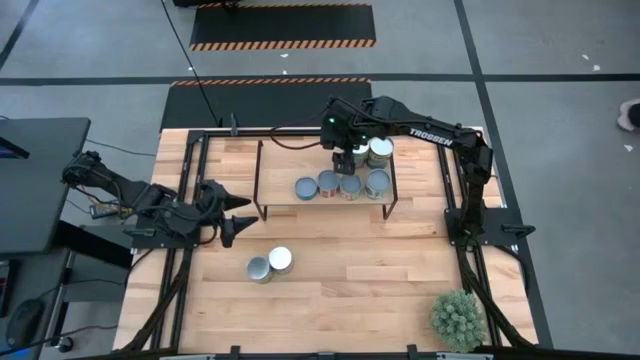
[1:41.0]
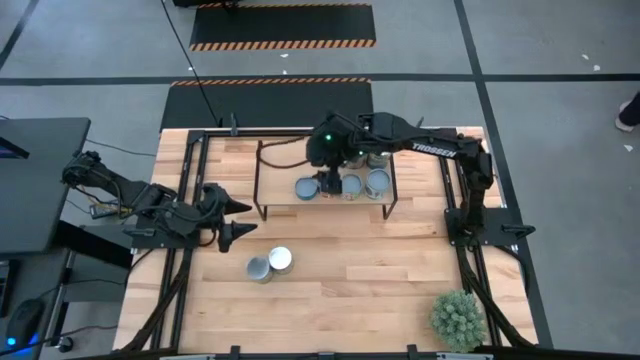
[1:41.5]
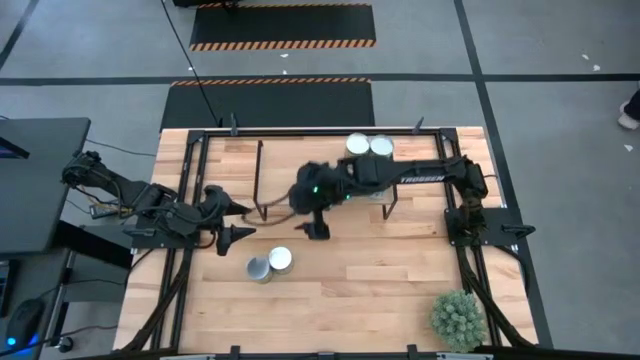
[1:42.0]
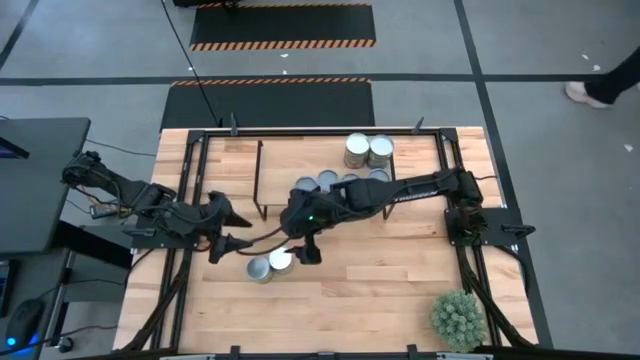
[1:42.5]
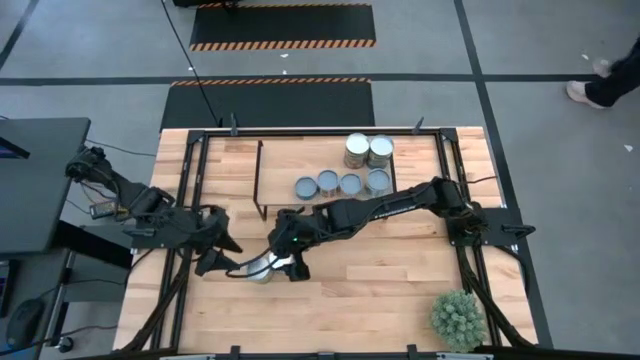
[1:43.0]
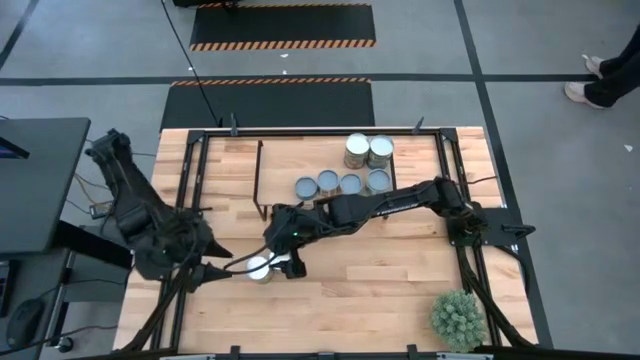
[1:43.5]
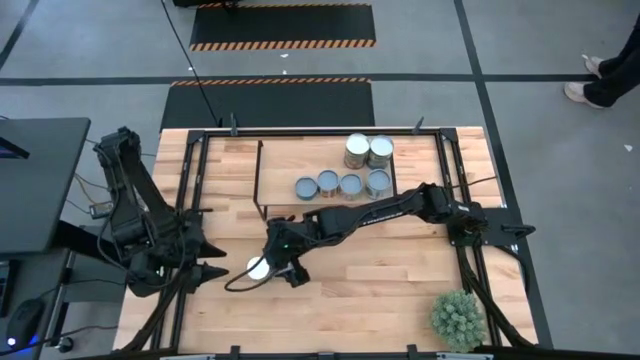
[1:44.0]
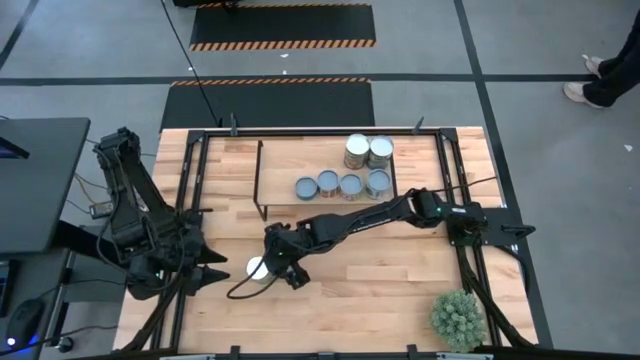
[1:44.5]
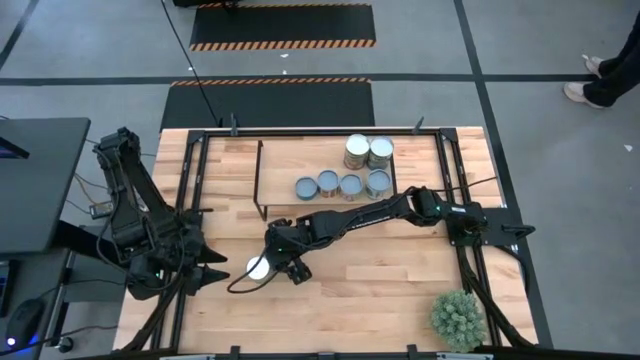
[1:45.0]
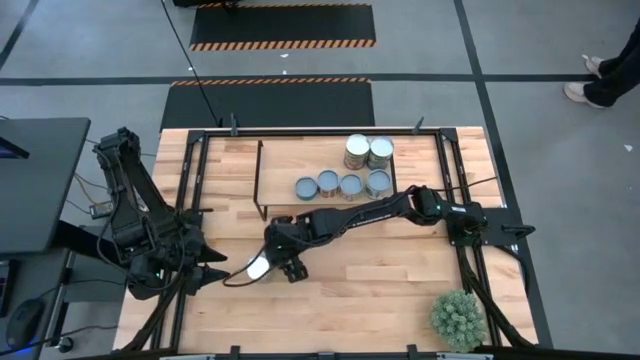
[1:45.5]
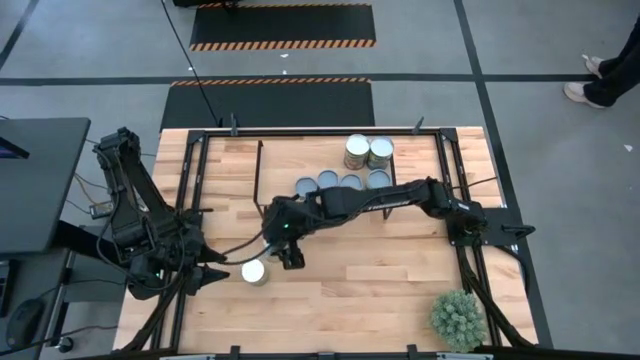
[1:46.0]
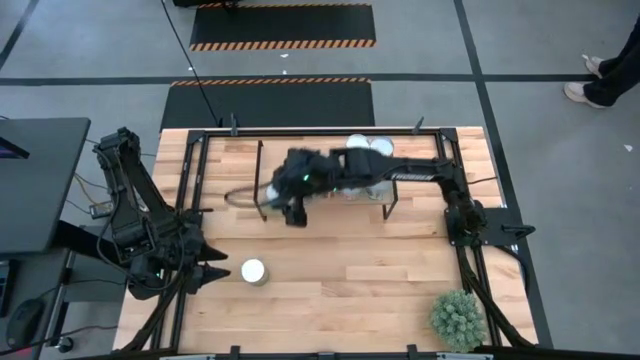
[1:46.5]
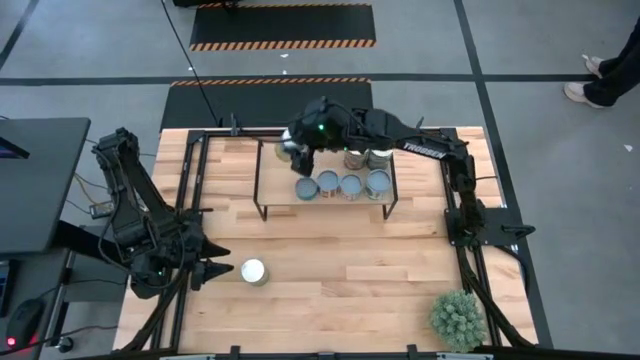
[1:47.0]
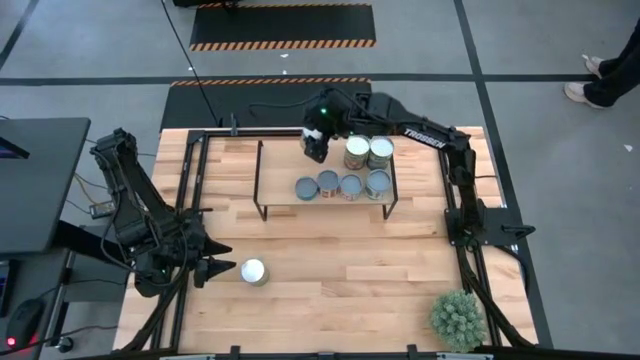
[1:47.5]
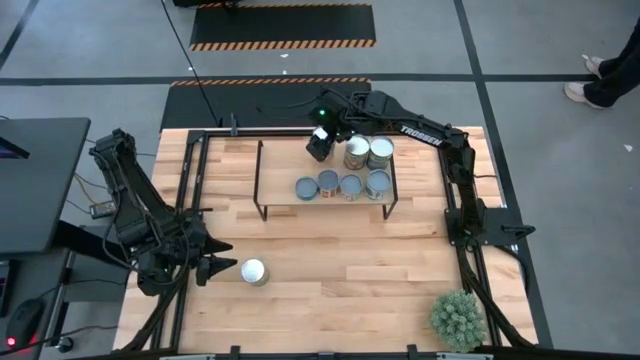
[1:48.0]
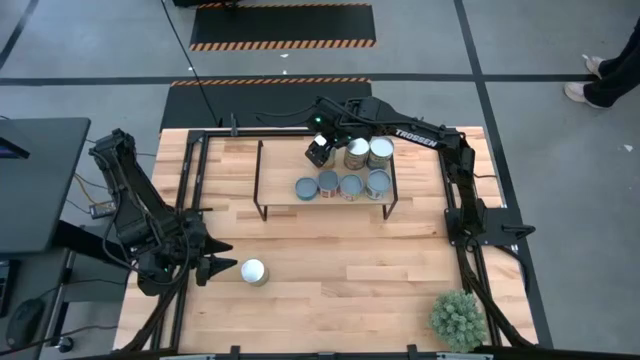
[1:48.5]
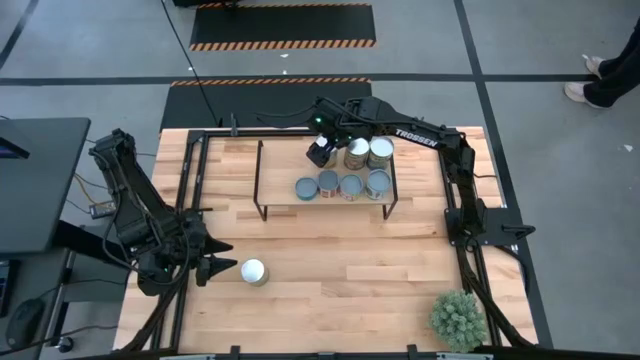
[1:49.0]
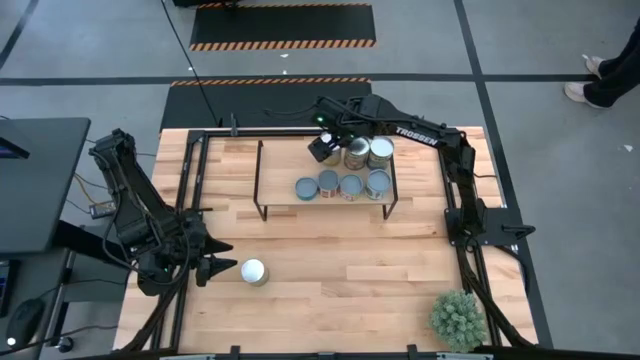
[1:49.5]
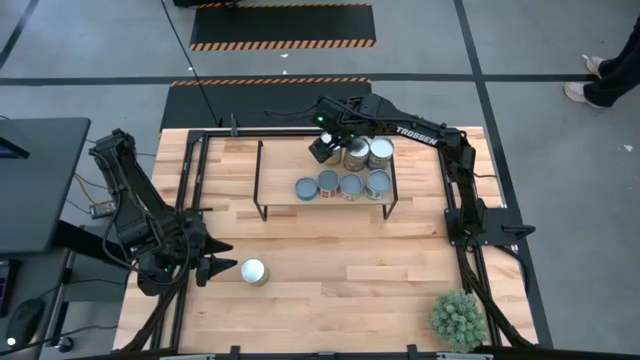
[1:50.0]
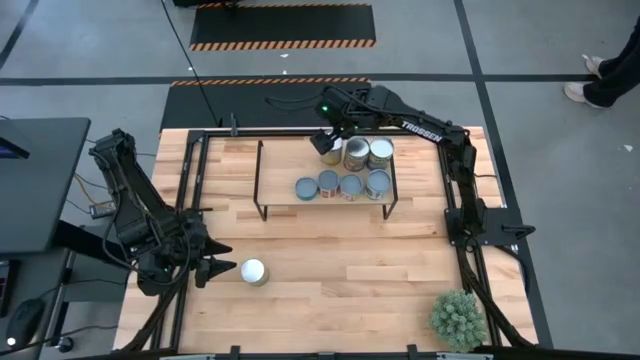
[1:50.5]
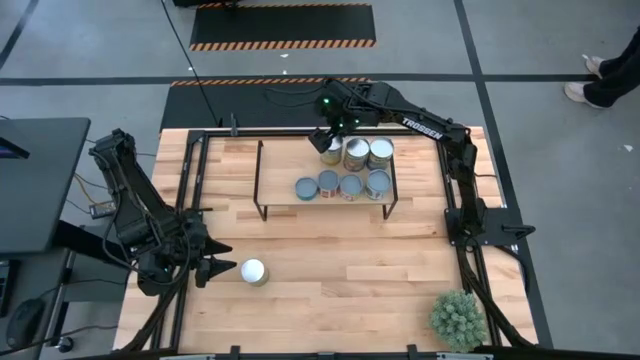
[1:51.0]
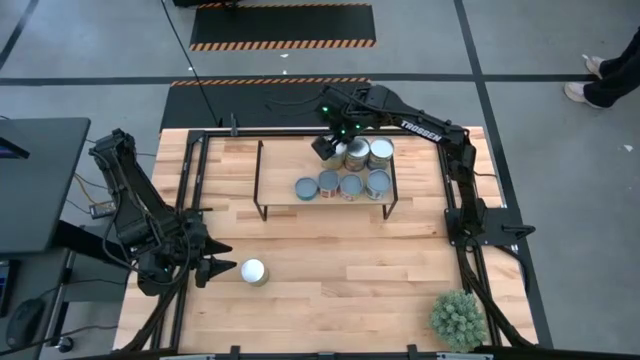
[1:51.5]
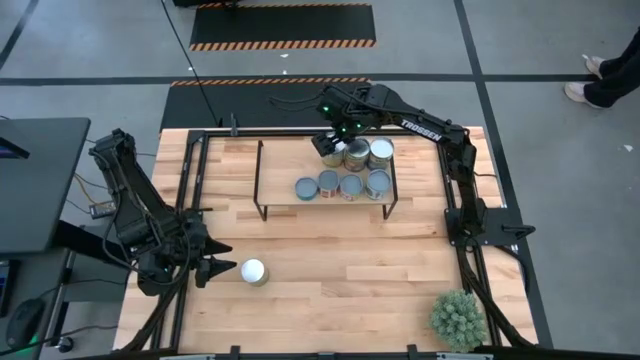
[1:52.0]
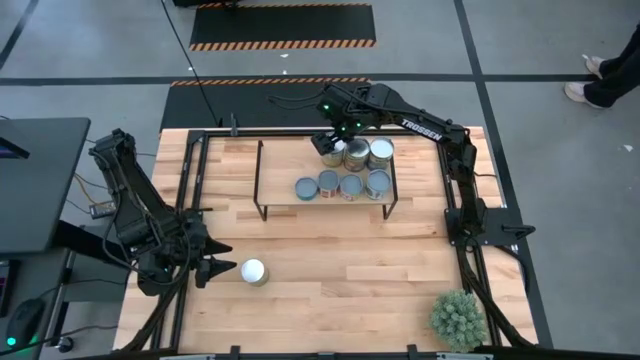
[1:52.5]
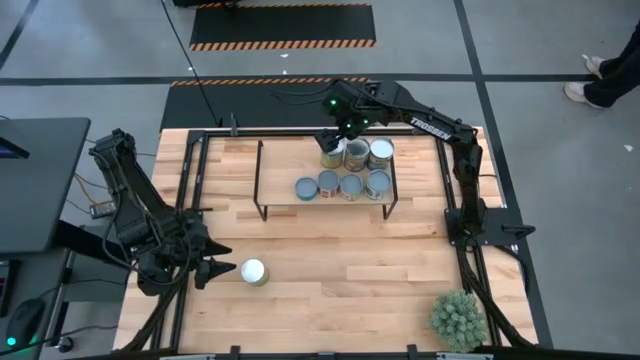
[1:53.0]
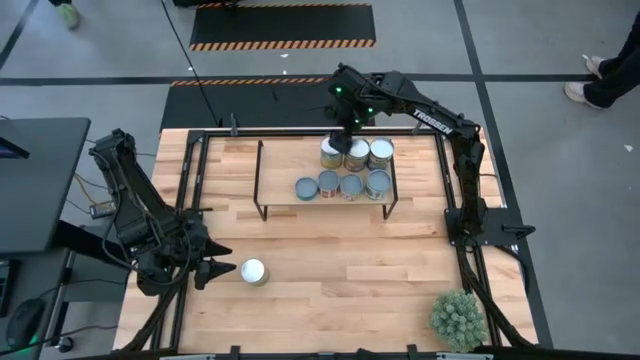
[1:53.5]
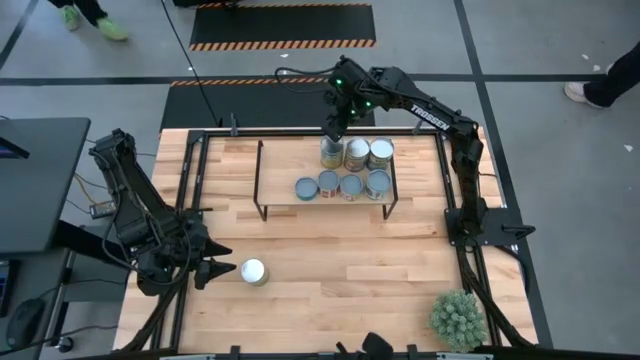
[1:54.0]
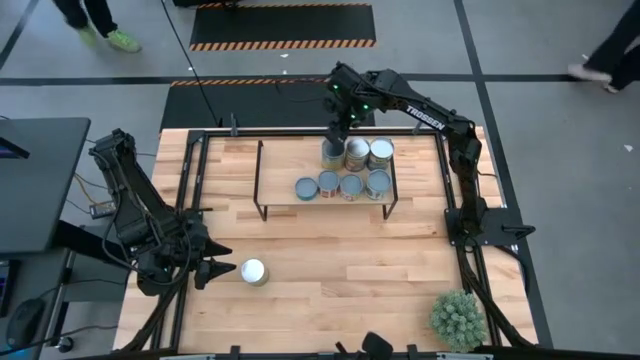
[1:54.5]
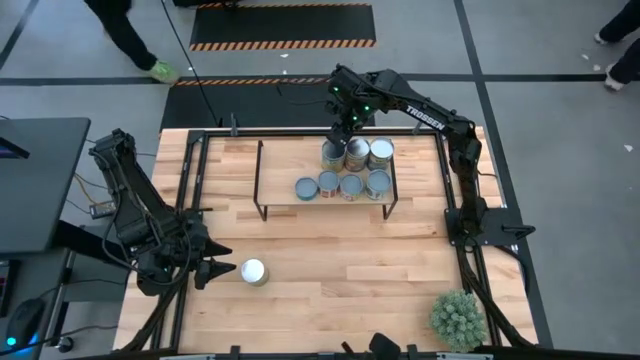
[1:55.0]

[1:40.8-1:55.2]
Task: Pick and place cans onto a shelf
Put the canned carrots on the shelf

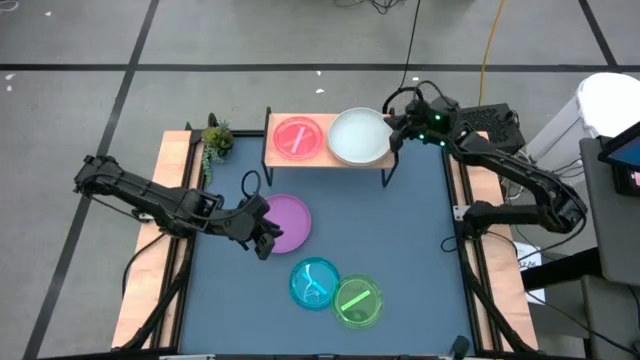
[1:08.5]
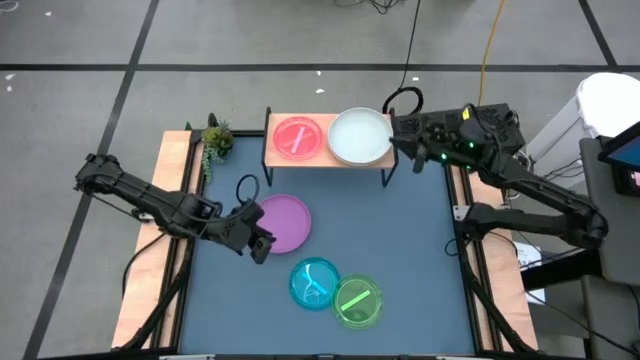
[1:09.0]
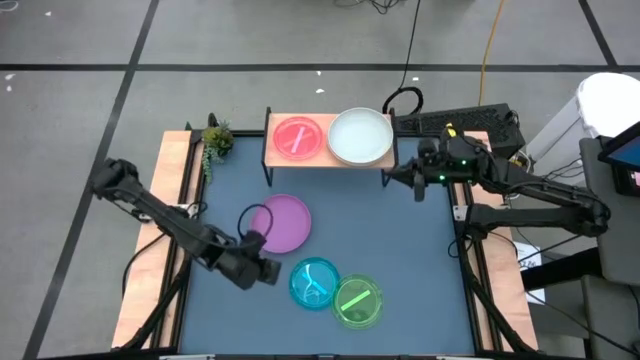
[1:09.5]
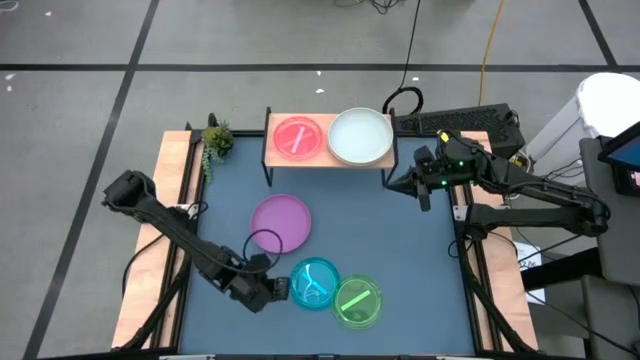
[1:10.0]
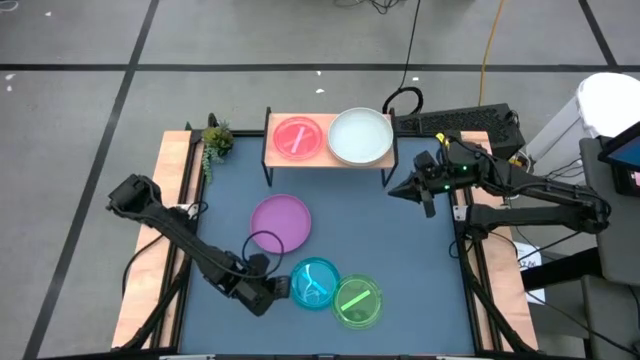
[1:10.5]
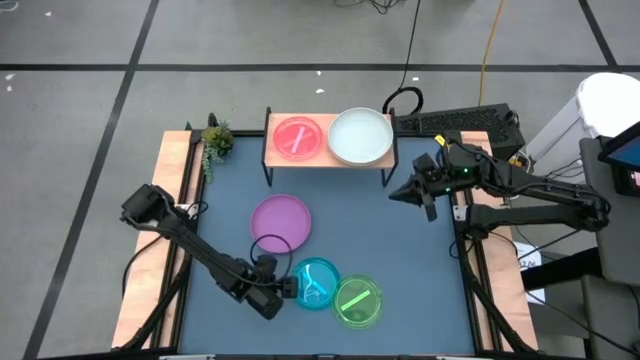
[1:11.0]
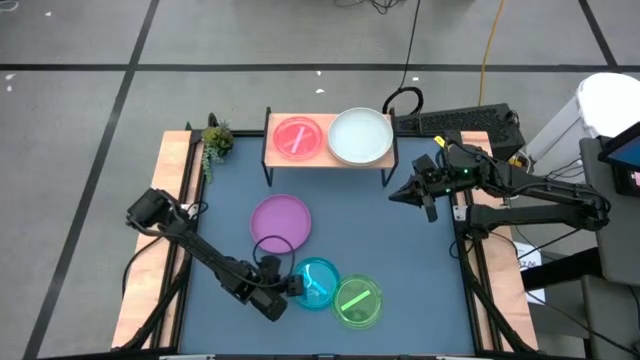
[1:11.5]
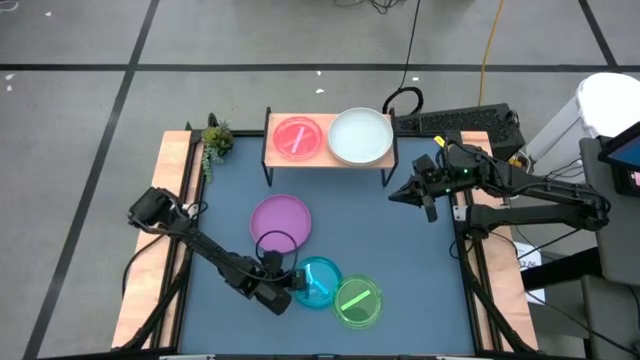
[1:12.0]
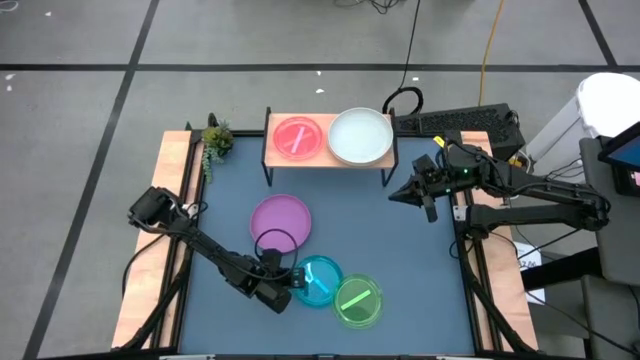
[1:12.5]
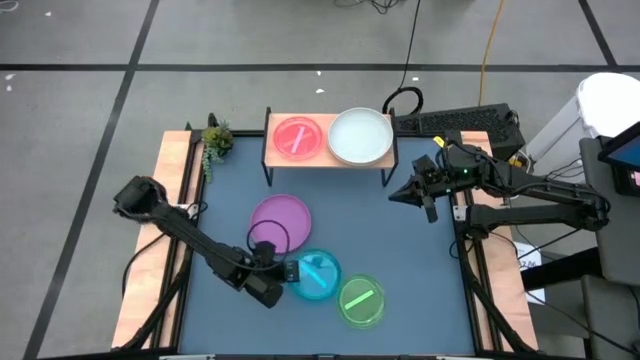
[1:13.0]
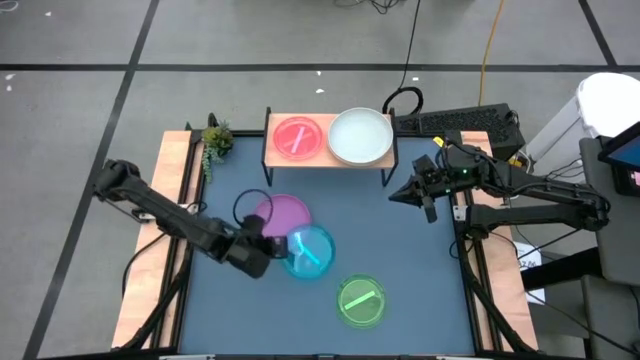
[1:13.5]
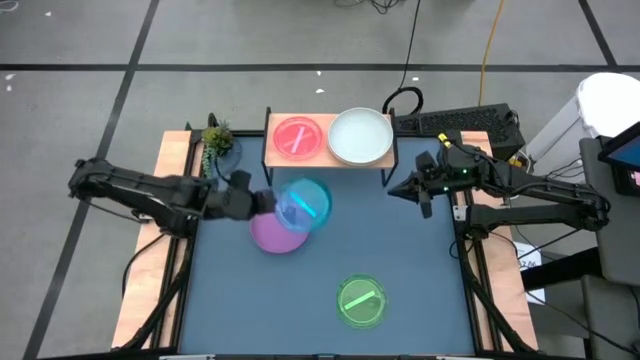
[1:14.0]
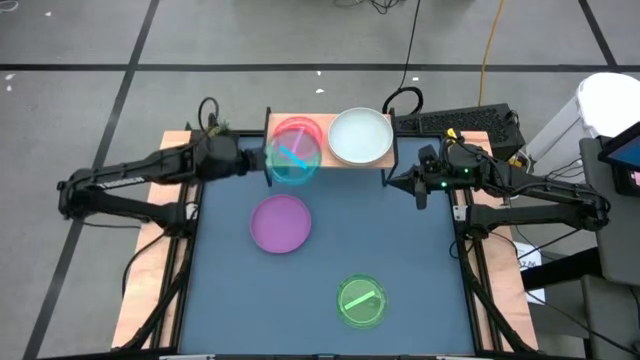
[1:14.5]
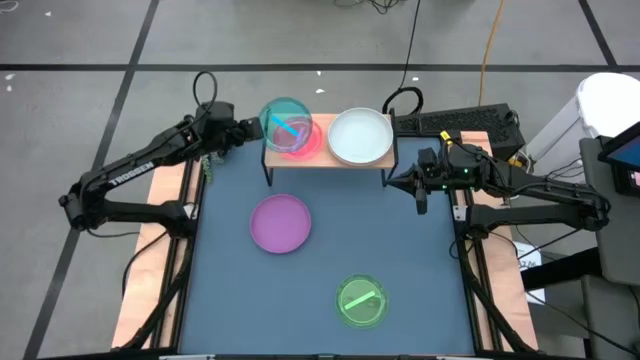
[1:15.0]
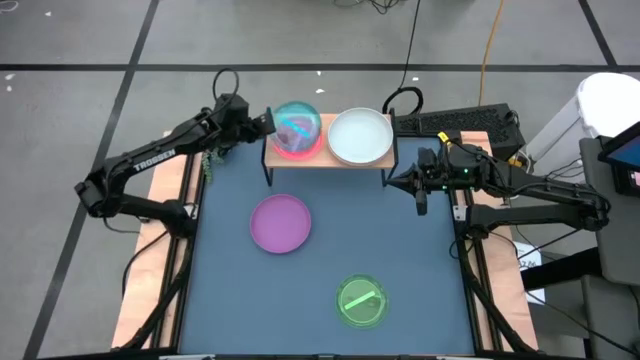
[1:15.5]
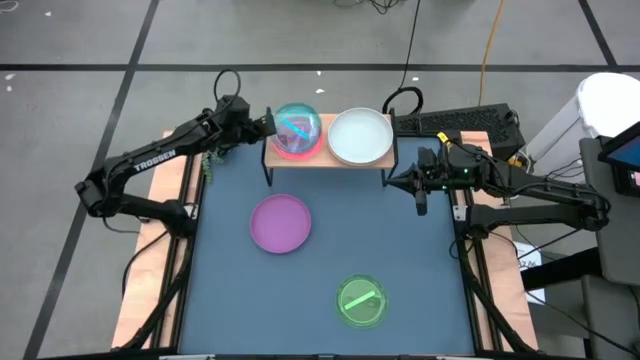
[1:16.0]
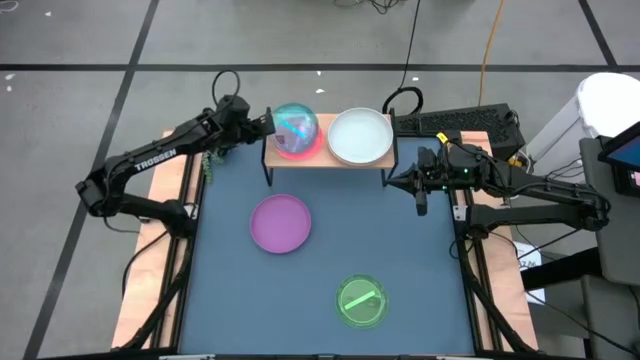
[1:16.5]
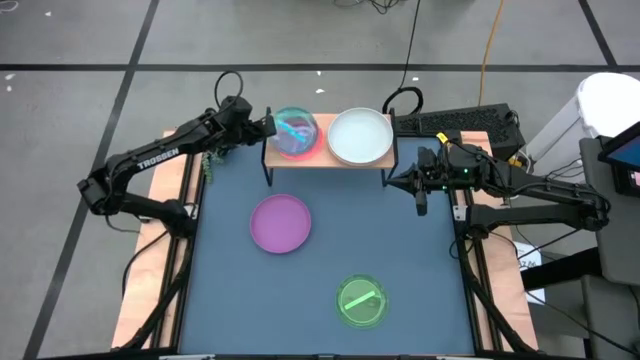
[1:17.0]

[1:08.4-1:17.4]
Task: Place and stack plates onto a shelf
Stack the blue plate on top of the pink plate on the shelf
